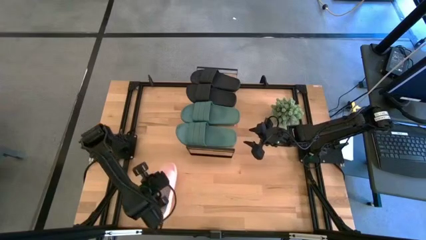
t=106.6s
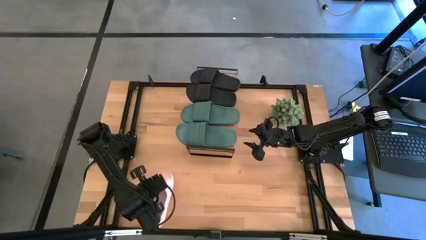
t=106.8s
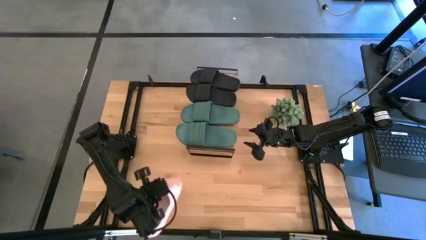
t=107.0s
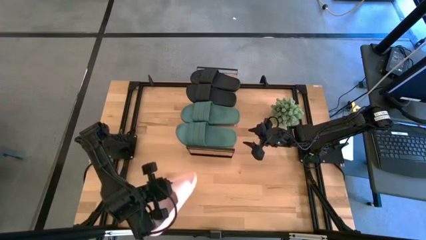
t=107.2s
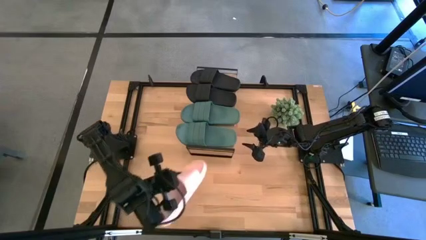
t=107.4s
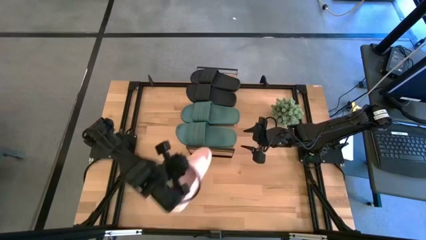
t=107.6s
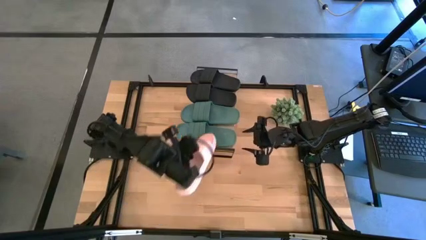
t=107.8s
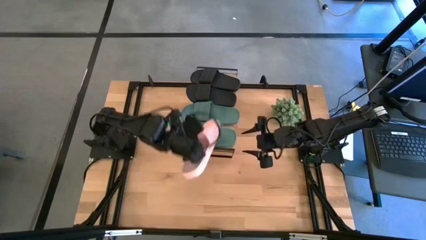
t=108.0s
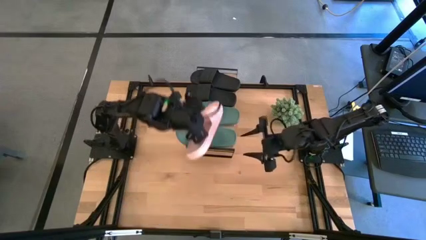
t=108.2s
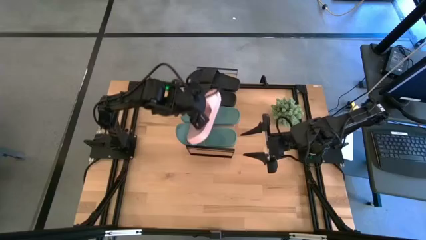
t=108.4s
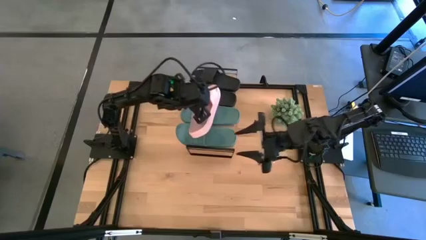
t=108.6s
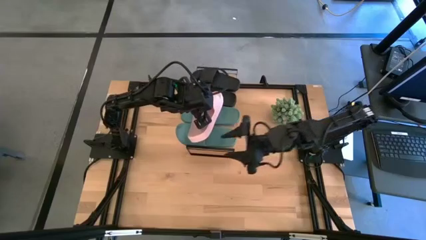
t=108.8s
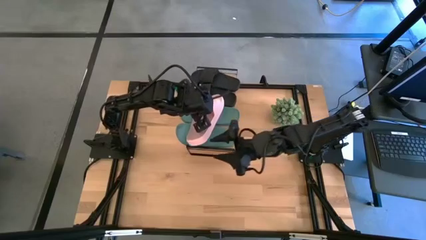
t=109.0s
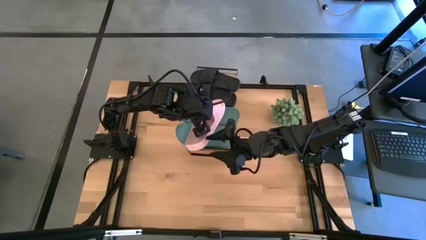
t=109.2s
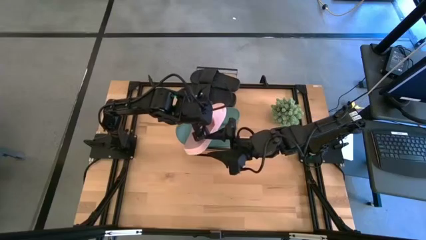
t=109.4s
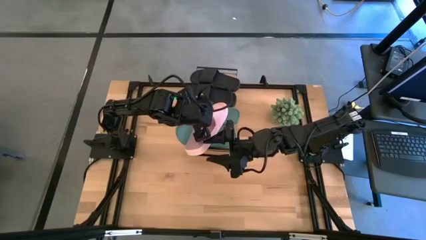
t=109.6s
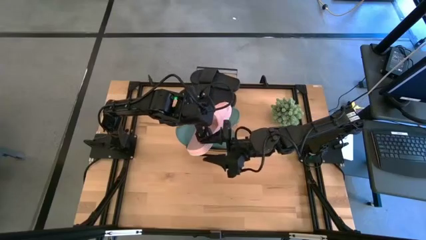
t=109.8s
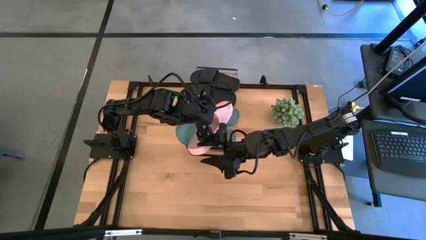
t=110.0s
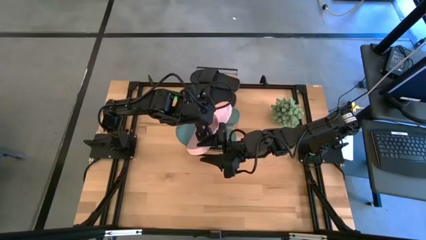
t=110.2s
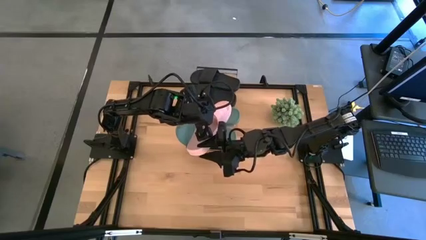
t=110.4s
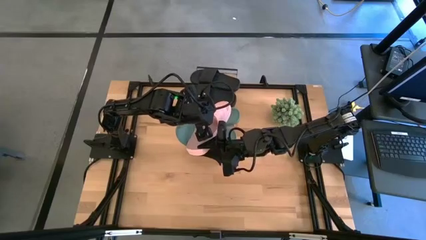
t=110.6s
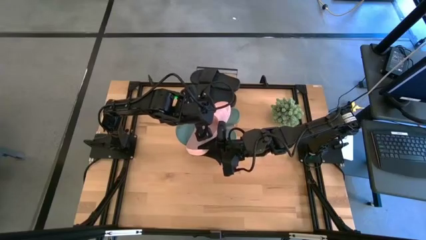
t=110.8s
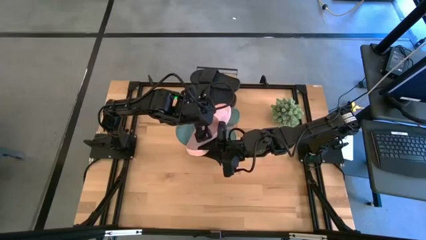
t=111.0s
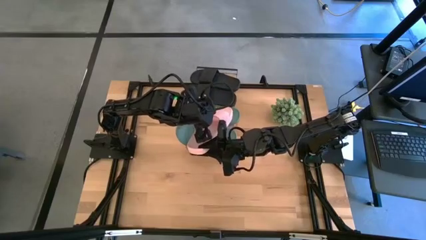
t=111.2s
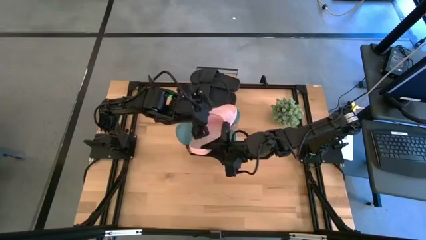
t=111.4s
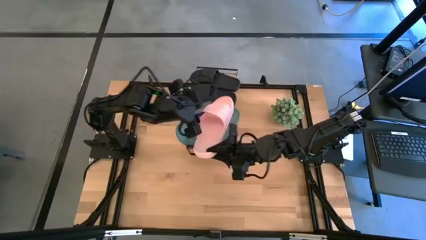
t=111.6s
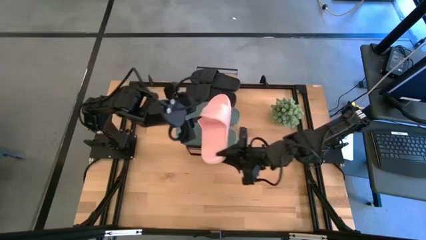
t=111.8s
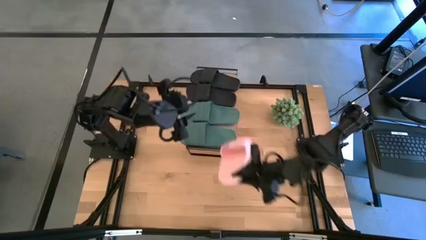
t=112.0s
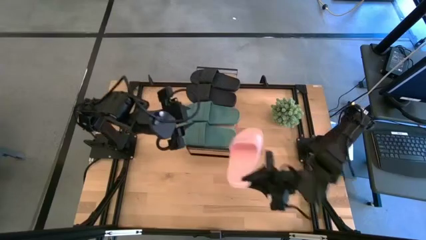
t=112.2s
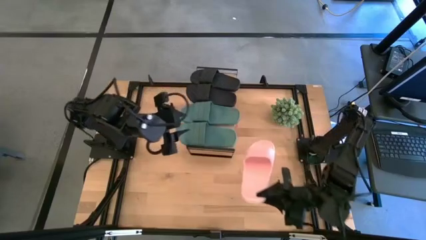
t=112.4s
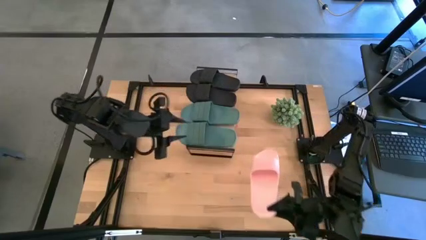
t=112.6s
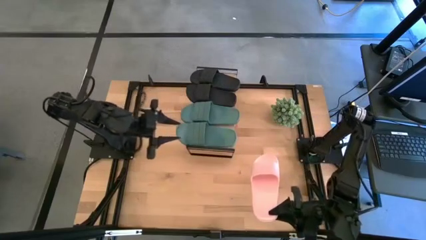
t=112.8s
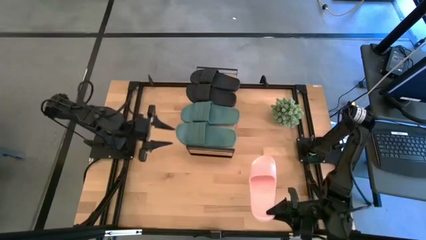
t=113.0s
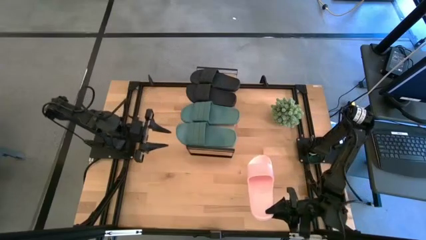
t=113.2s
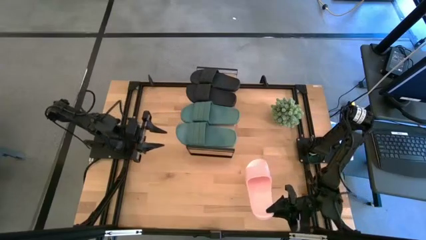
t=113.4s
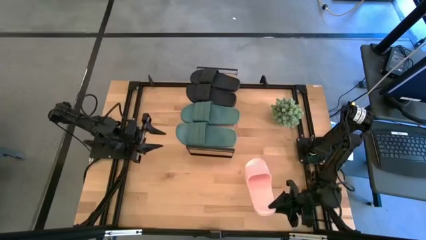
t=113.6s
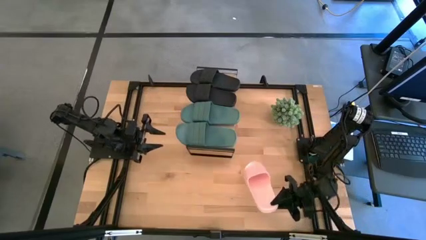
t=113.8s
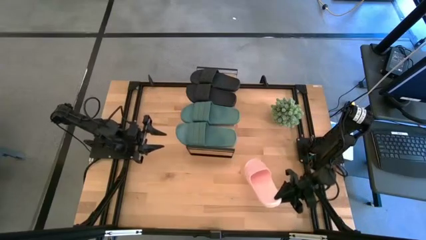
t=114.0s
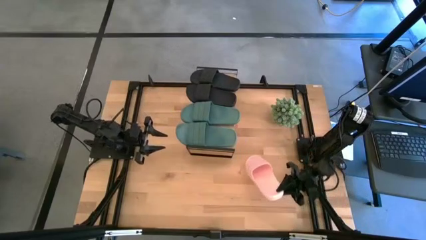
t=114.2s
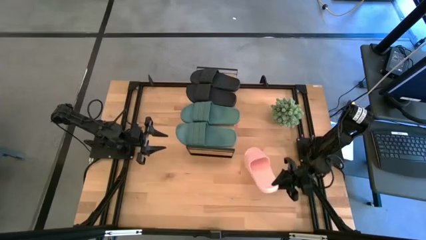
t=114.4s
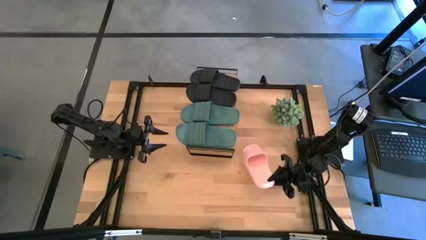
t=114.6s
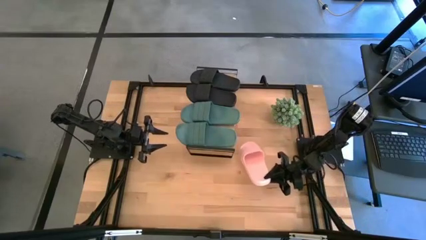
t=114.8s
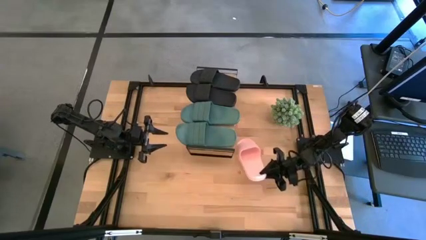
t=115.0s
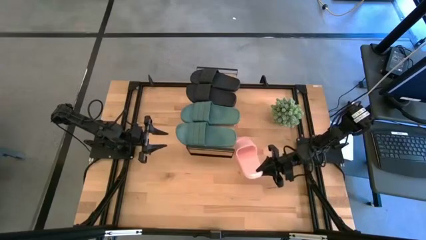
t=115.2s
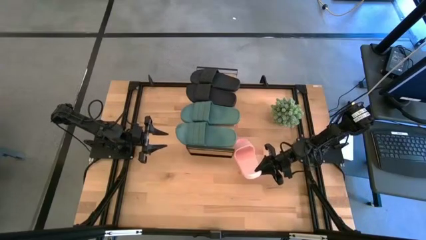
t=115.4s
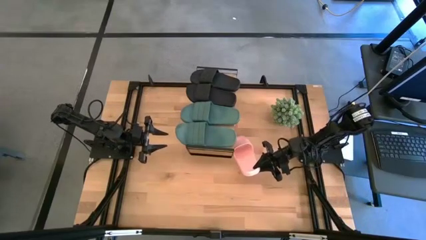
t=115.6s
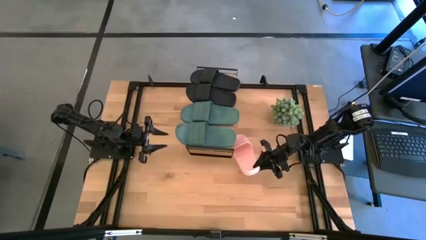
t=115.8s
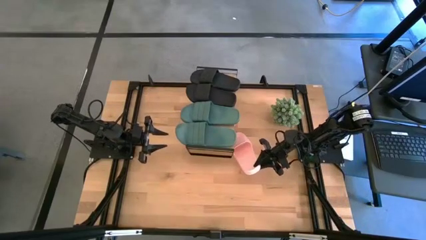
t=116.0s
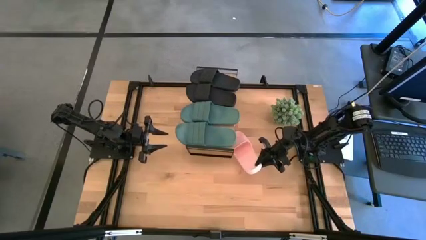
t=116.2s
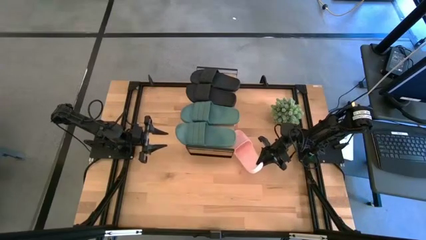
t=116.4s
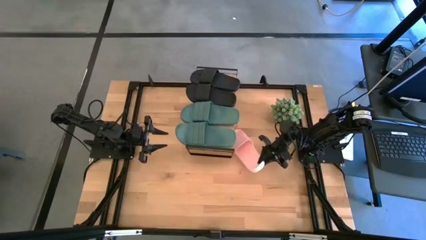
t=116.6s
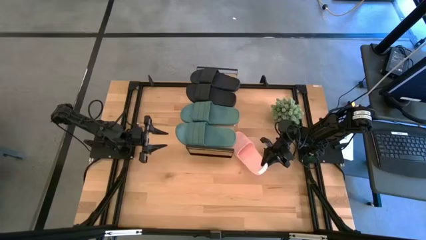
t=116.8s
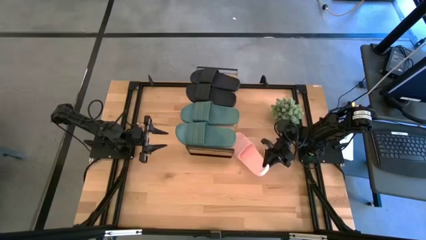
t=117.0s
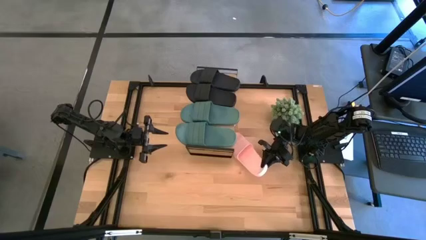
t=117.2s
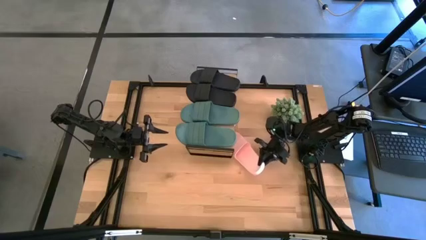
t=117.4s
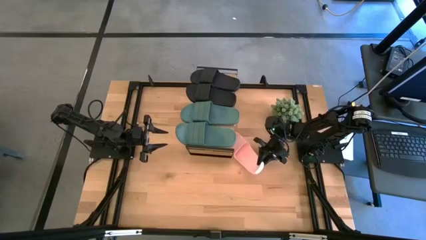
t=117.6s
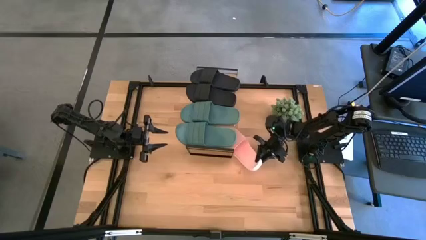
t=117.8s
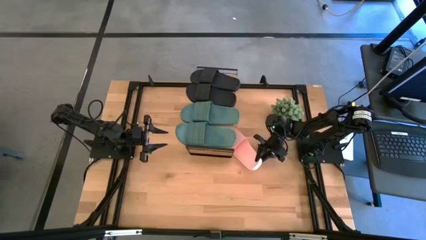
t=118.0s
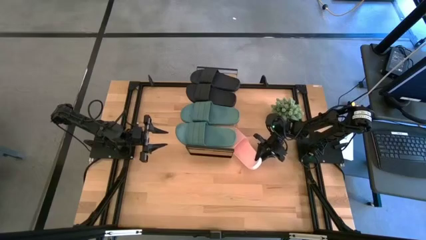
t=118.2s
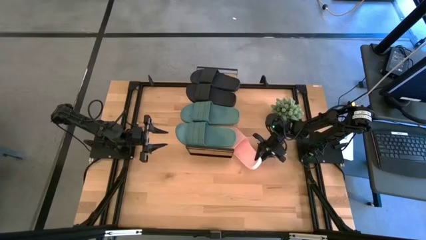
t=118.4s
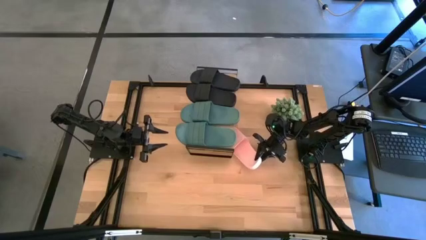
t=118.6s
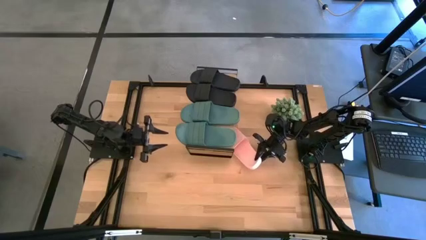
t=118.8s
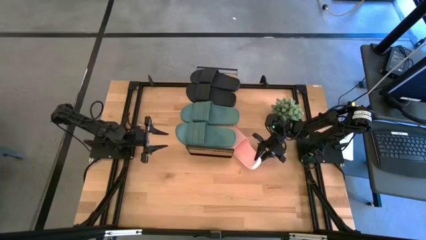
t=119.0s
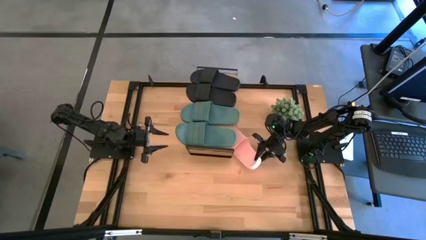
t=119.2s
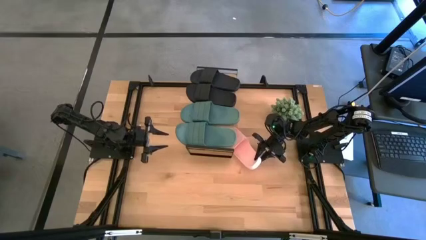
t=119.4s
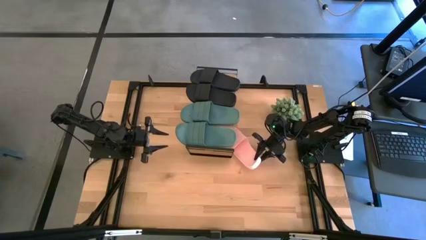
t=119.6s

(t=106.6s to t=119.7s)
Task: Pick and place slides into the shelf
Put the pink slipper under the shelf

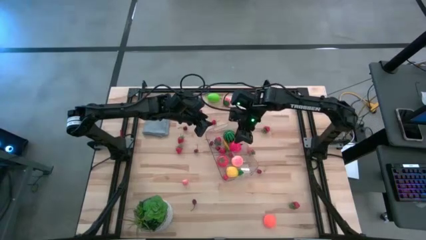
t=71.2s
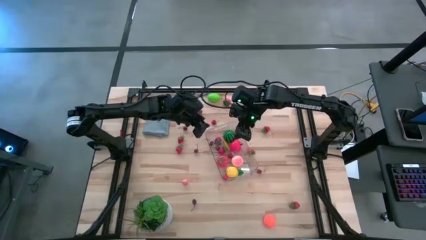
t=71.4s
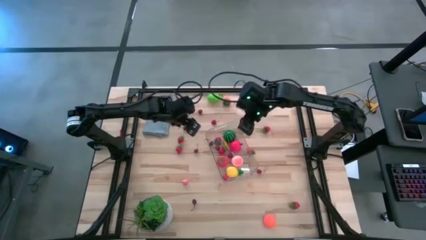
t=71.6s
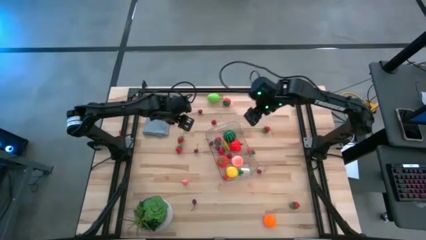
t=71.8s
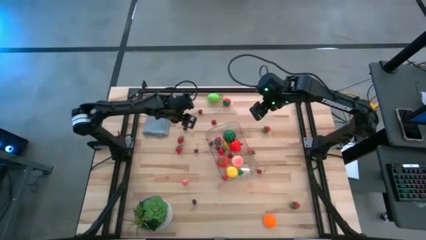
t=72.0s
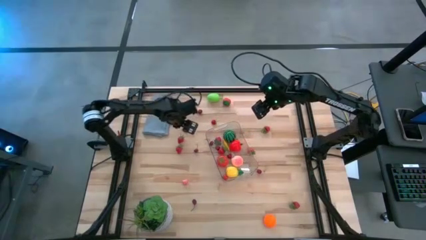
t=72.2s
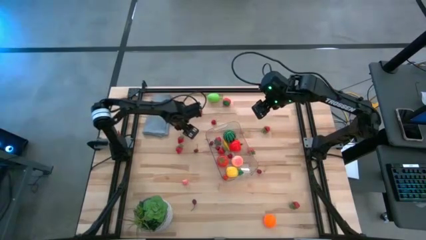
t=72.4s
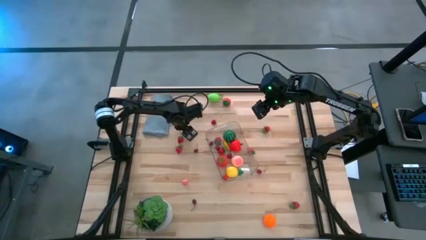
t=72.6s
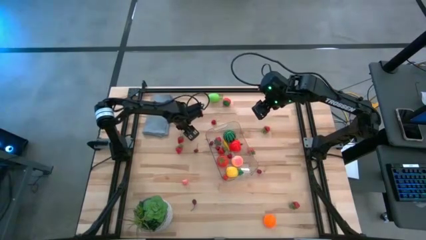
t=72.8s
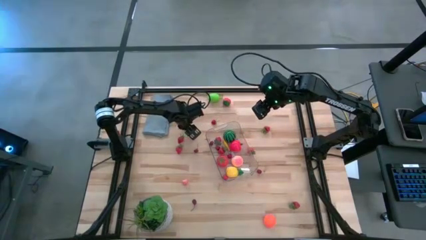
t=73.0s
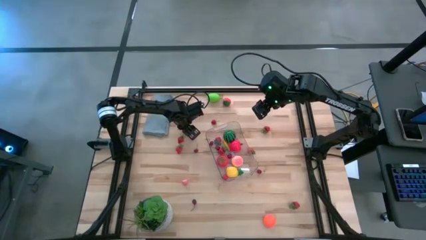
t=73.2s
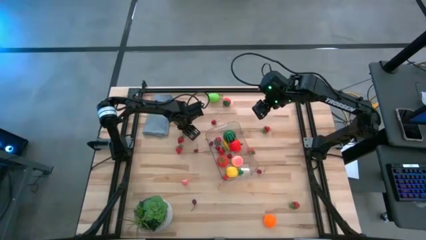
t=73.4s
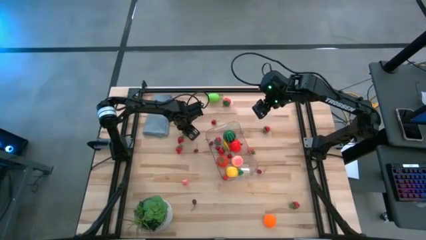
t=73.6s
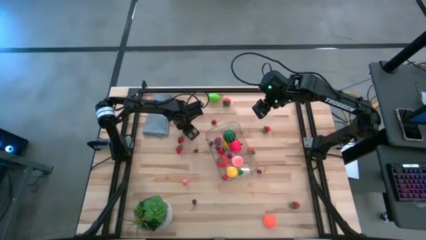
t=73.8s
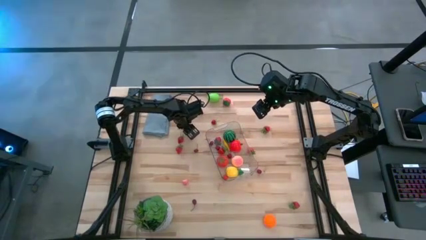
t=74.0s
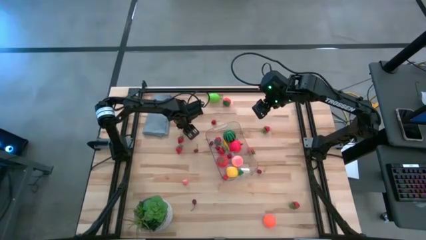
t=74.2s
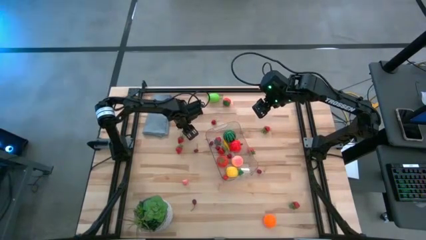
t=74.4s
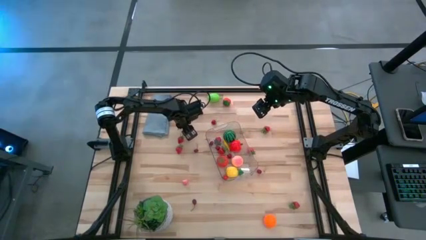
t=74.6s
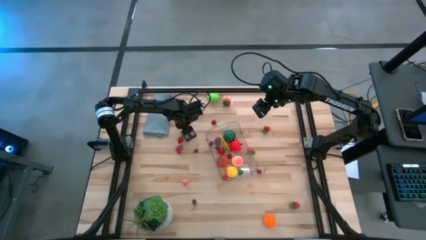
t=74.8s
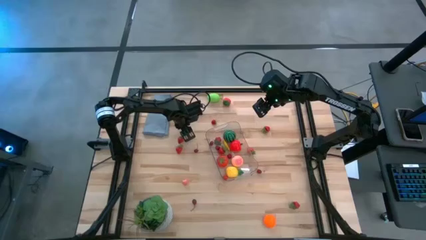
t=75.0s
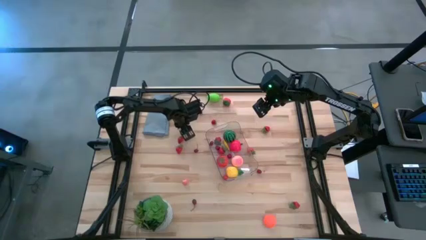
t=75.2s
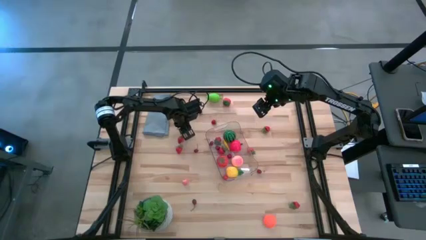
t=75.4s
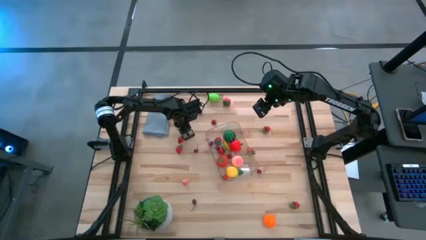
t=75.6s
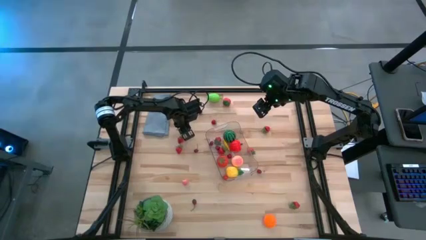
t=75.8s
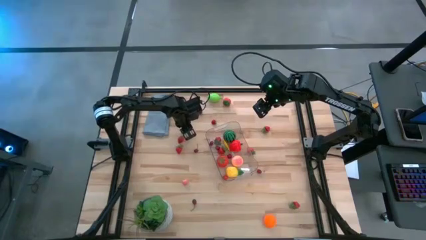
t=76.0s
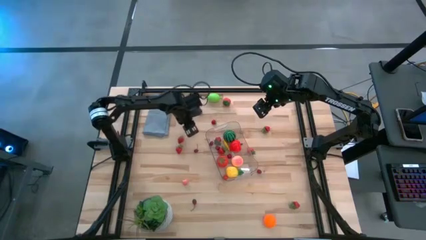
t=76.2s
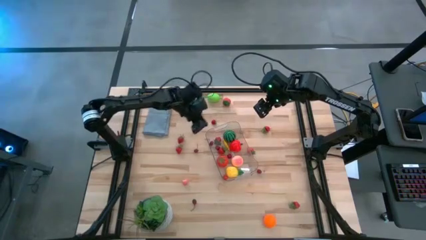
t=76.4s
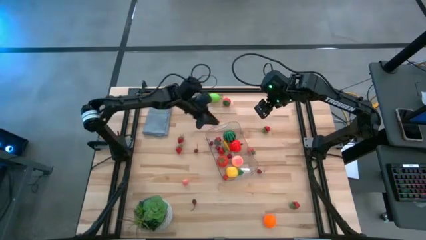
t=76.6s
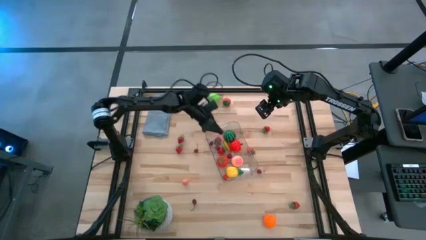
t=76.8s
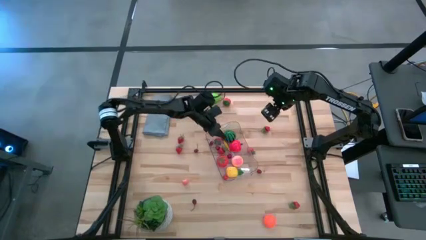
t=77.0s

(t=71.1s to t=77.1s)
Task: Pick and placing Produce into tupperware
Put the red cherry into the transparent bin
